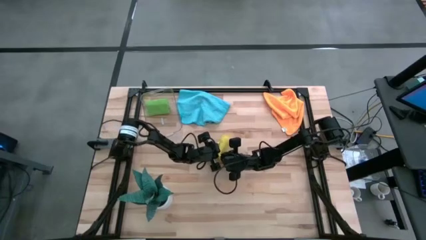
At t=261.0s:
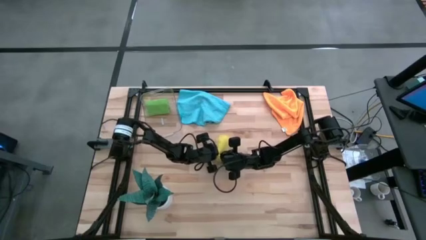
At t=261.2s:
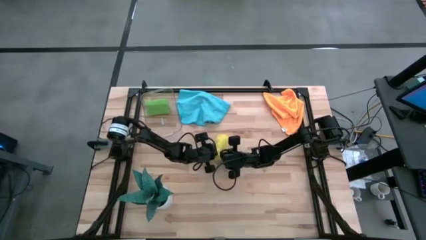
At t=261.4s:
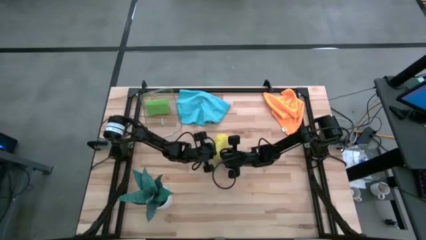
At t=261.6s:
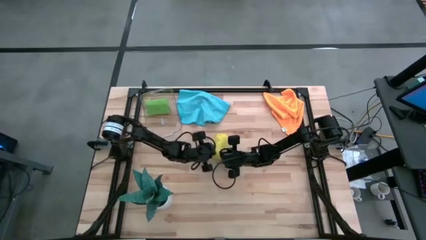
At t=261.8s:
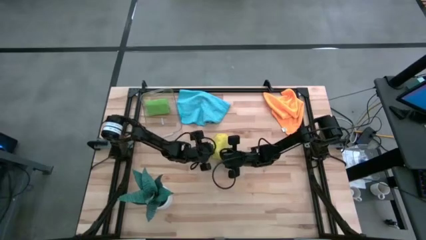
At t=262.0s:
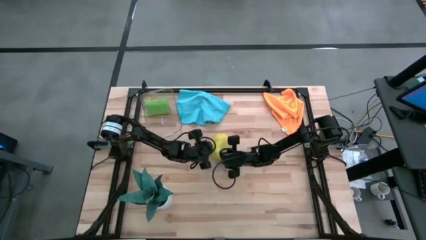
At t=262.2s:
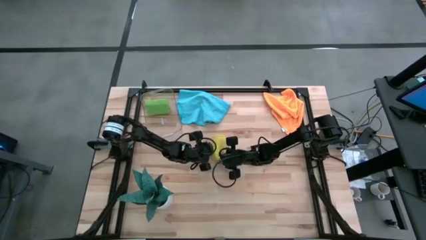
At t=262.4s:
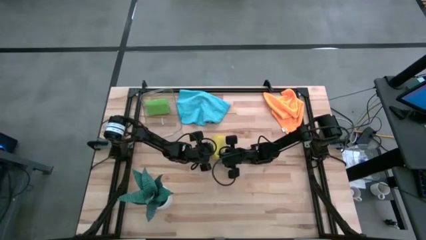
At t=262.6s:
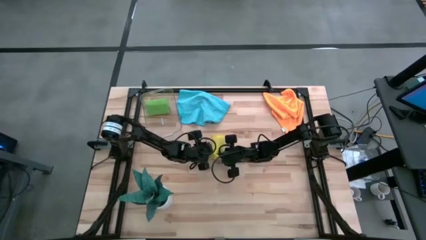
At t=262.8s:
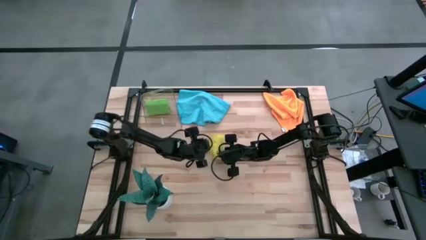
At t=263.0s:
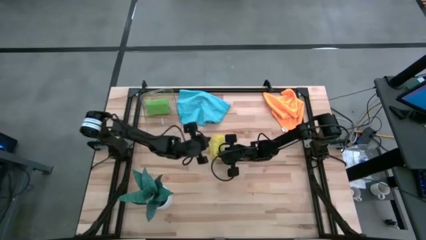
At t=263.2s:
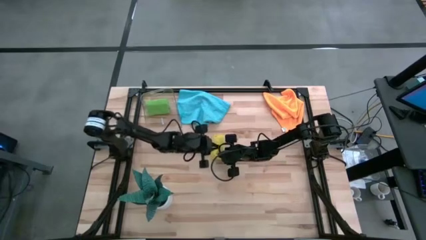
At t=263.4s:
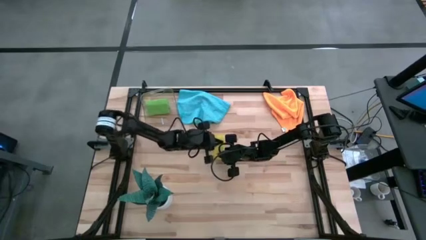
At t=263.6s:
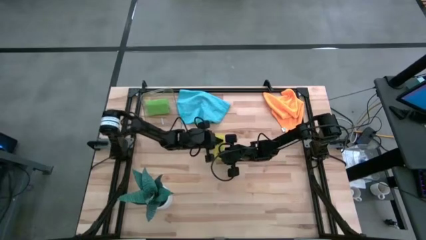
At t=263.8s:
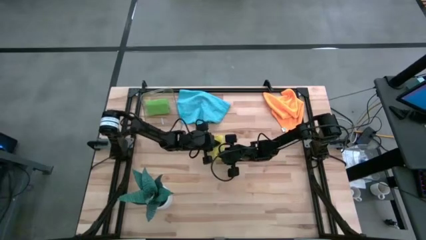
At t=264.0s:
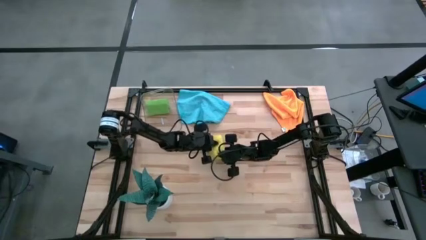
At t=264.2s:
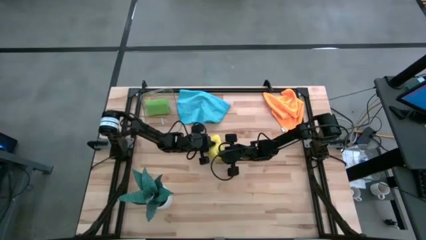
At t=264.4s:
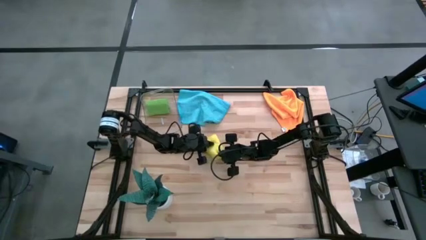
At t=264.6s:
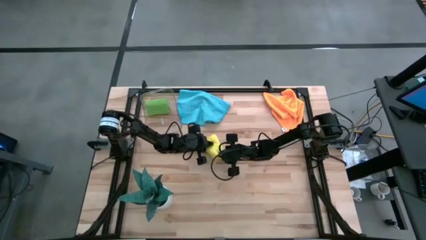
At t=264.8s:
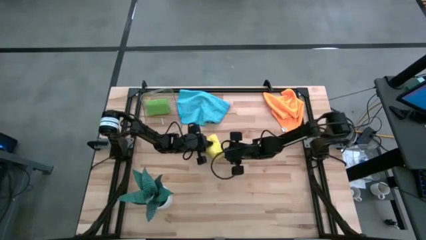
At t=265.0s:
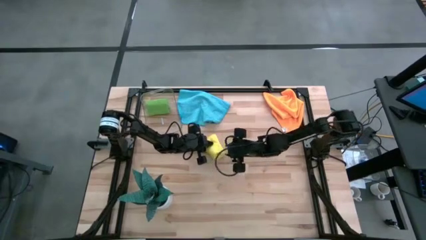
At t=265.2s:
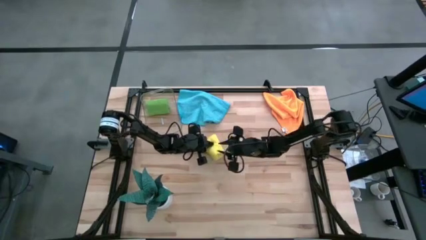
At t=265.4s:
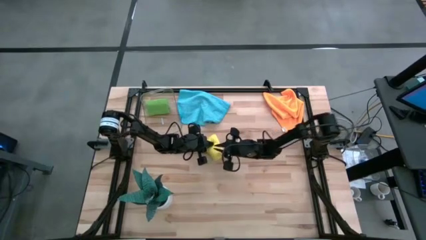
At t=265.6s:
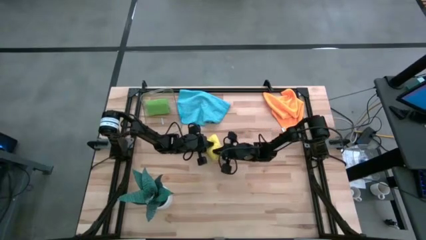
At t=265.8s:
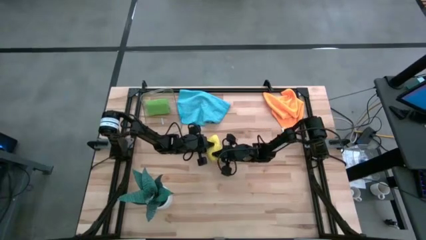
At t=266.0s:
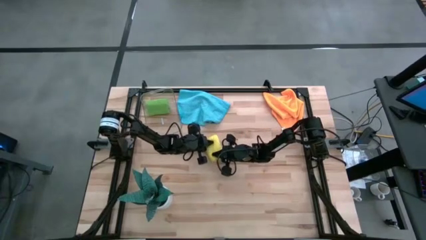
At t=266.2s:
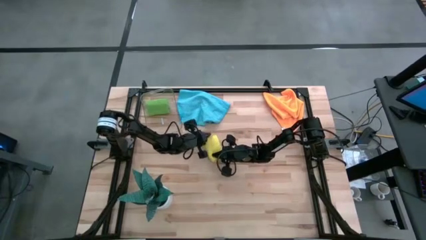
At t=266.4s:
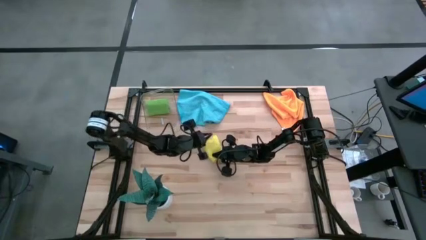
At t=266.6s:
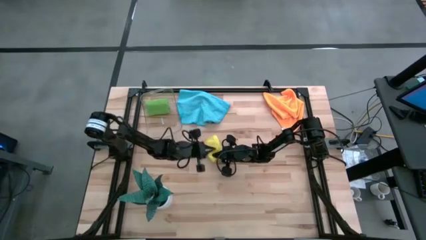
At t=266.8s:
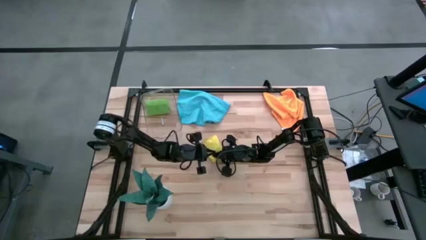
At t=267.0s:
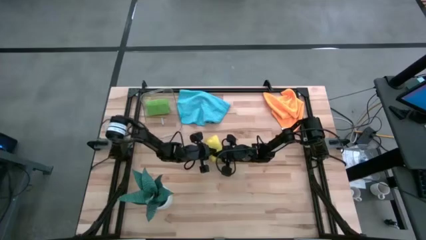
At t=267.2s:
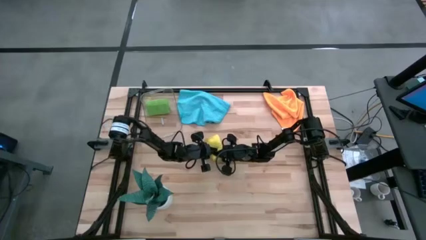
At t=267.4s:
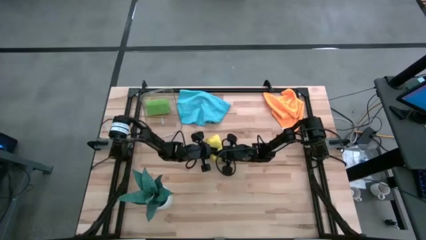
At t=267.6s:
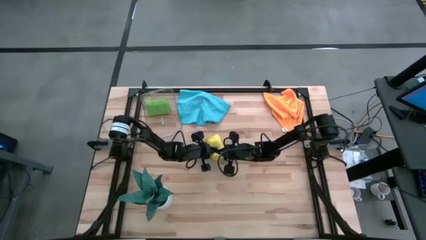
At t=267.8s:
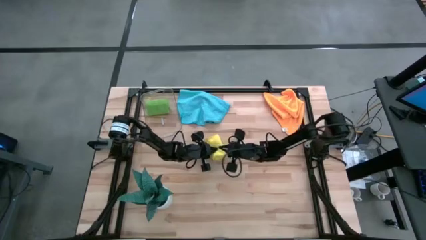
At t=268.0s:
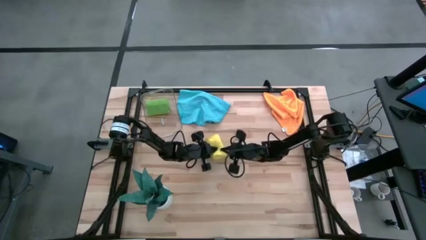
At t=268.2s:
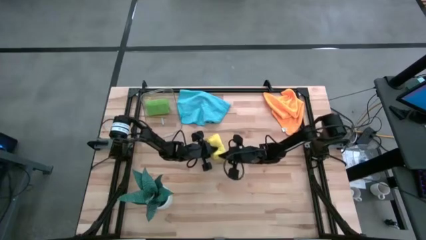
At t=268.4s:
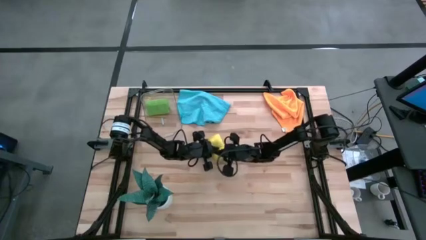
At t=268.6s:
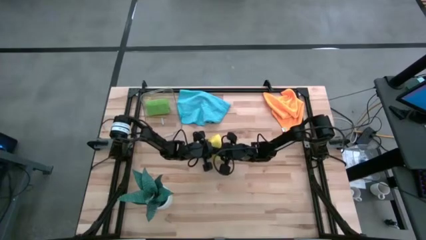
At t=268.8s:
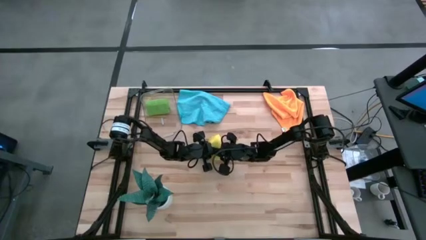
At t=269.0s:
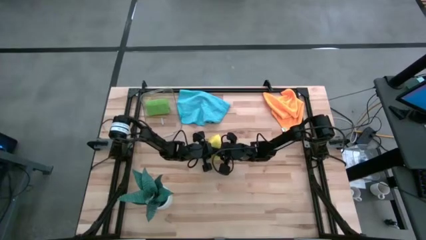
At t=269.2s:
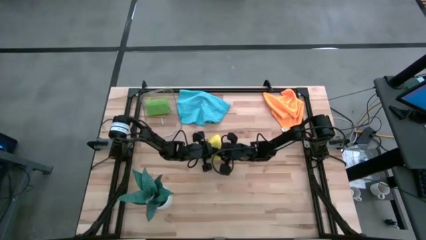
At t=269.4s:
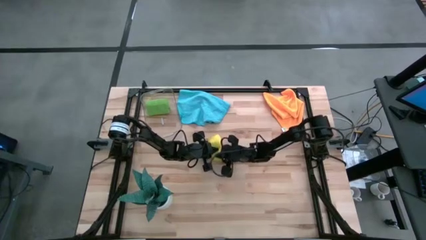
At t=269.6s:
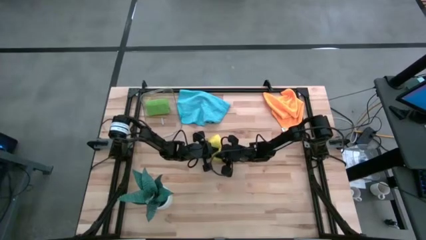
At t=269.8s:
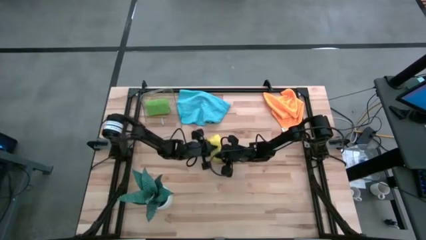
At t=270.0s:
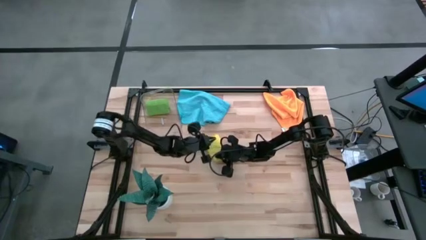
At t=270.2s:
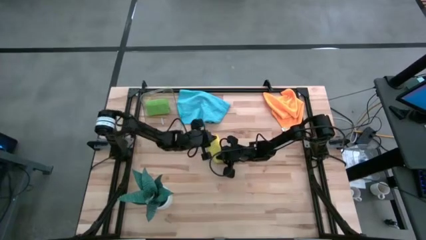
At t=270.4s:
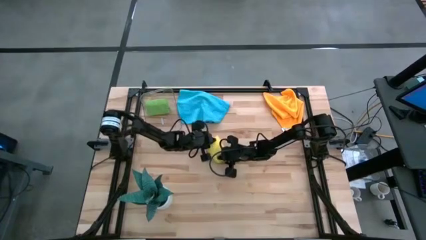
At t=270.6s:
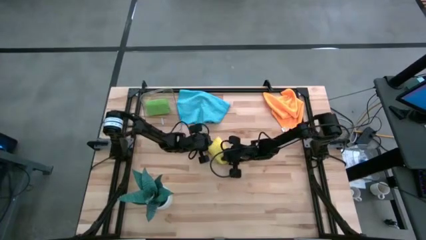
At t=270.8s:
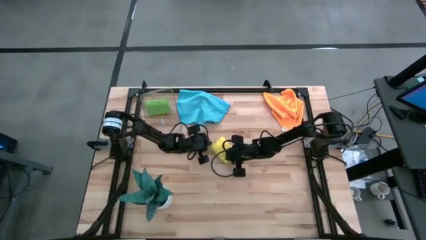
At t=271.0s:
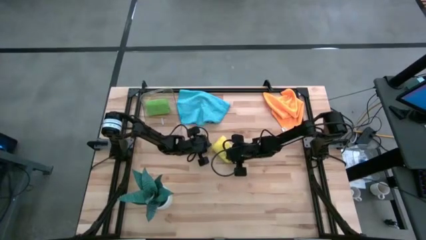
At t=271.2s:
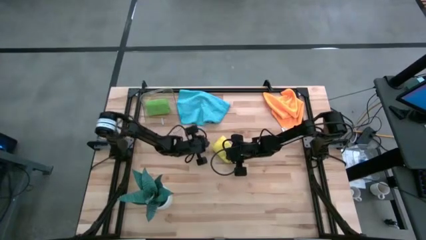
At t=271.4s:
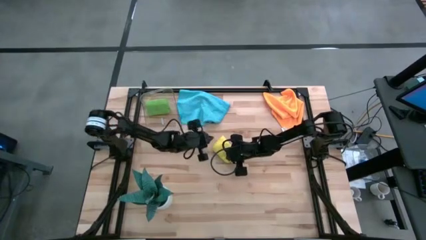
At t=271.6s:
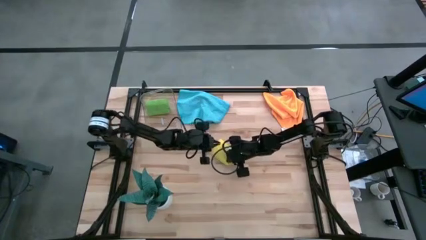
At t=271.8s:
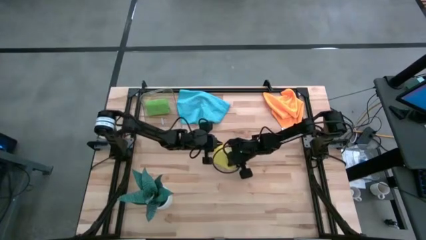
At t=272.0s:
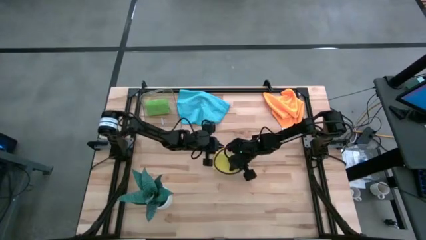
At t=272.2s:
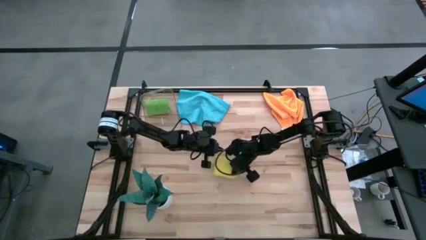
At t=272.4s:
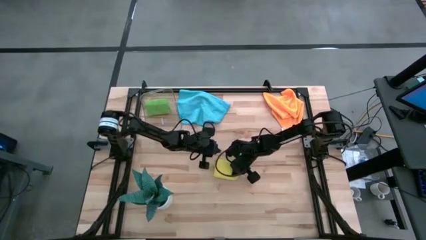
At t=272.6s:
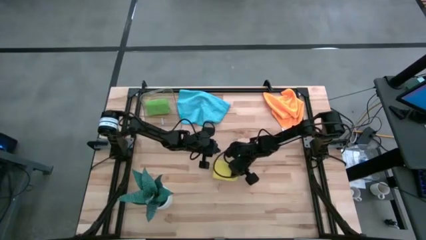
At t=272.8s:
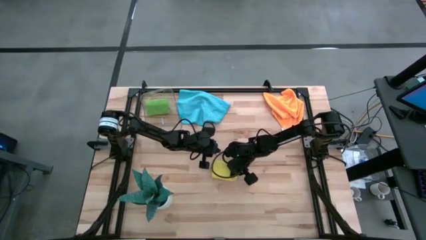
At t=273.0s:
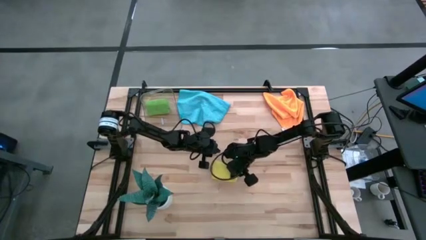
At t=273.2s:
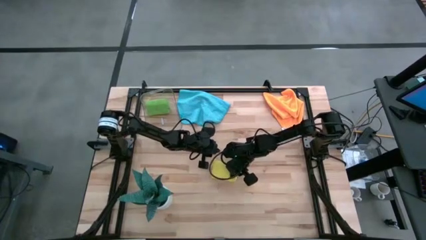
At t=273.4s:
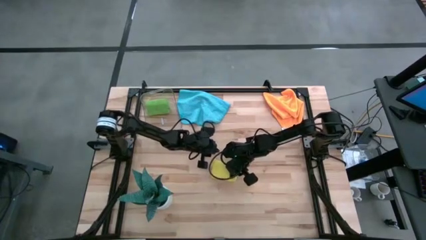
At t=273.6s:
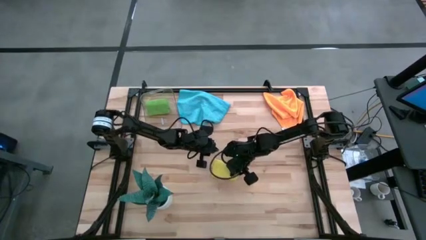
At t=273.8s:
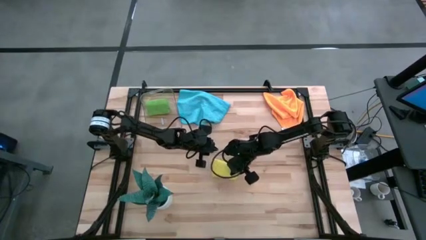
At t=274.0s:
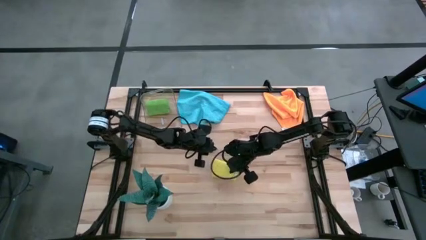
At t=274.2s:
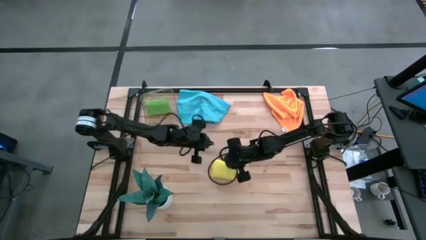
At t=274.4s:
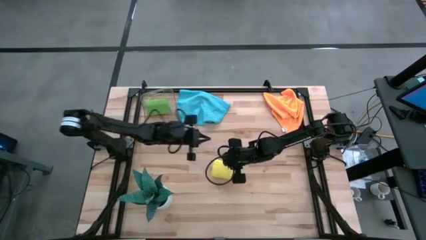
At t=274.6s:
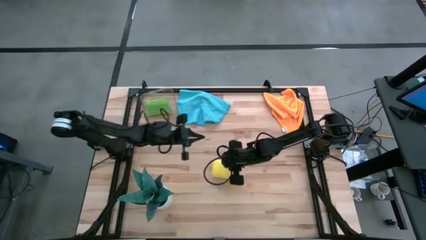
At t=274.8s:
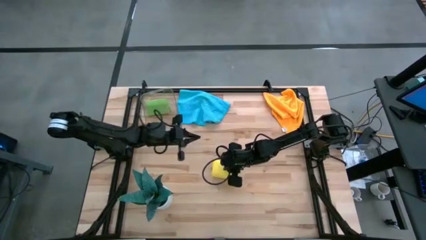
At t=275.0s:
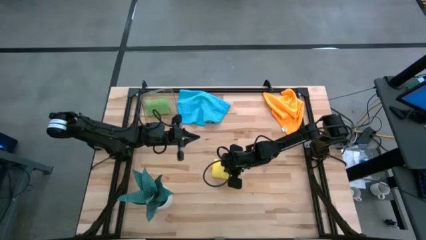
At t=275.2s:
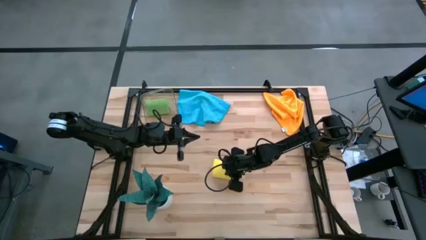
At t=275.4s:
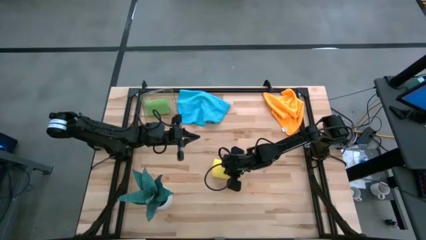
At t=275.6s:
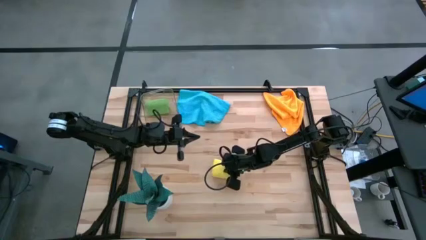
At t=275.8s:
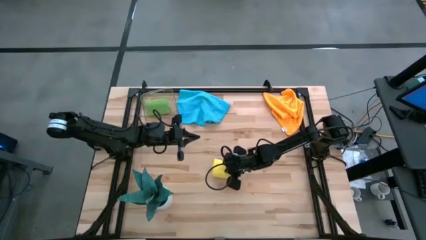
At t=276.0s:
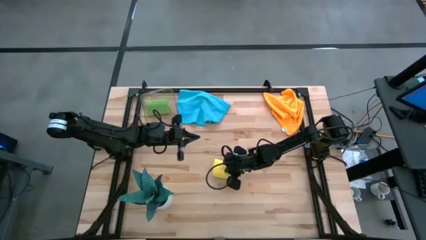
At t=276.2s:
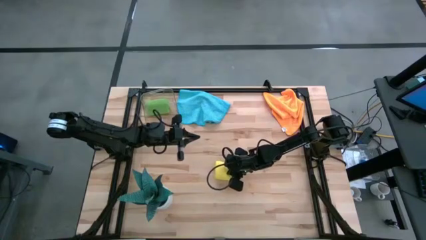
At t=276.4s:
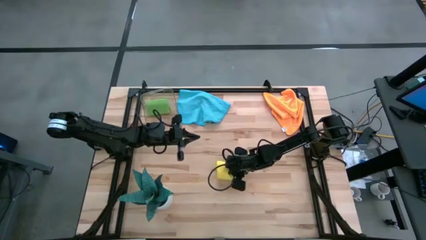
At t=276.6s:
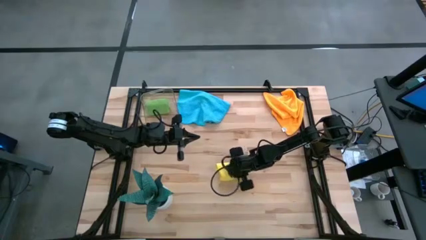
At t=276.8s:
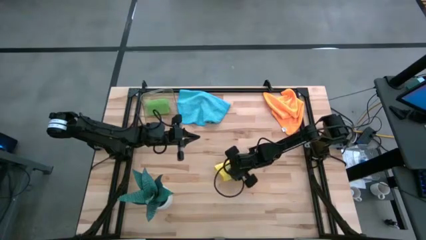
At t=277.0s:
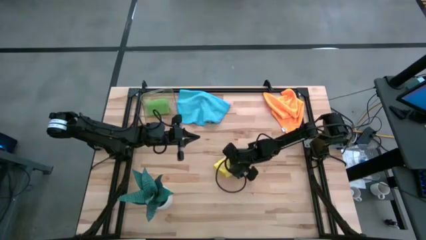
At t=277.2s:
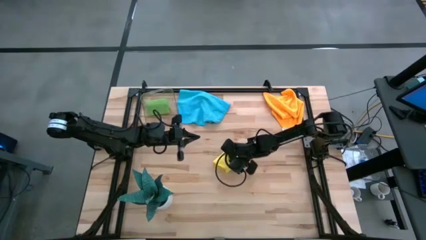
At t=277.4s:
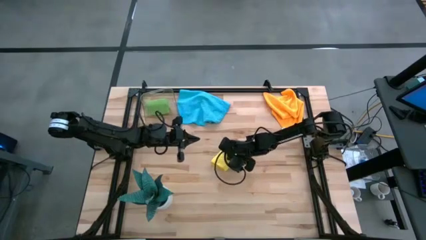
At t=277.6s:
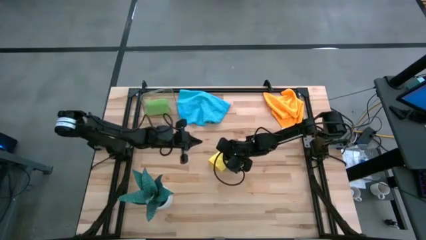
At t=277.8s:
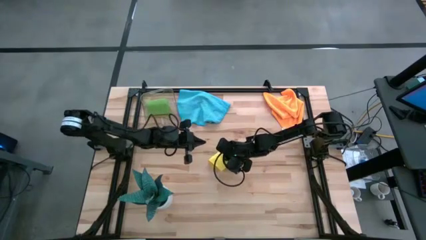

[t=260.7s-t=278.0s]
Task: Roll microfiber towels into tight, uniform cylinder then place into a basket
Roll the yellow microfiber towel
